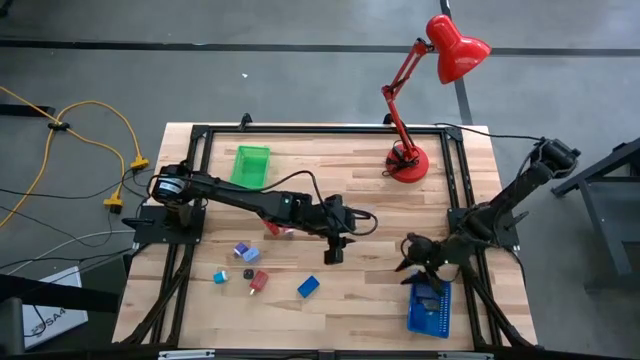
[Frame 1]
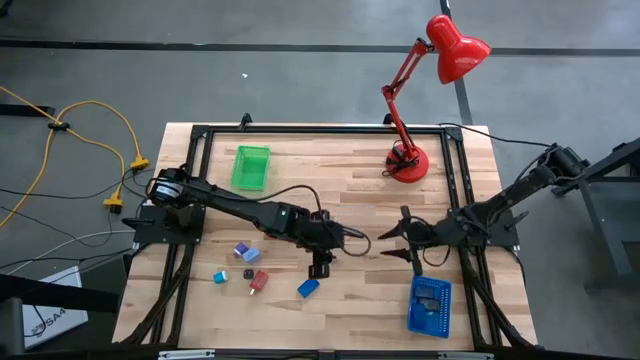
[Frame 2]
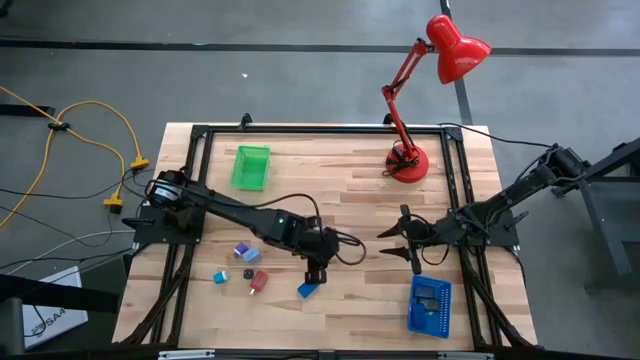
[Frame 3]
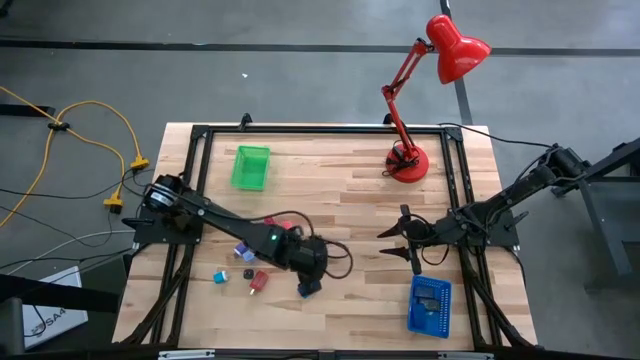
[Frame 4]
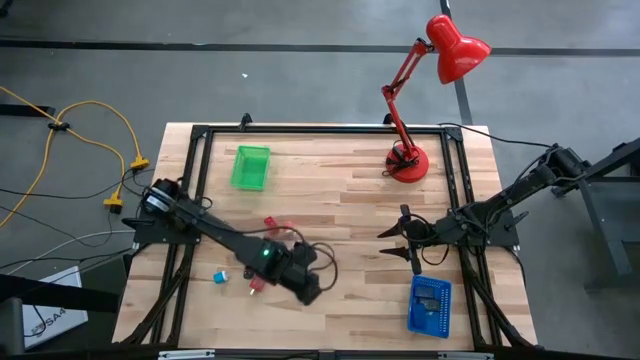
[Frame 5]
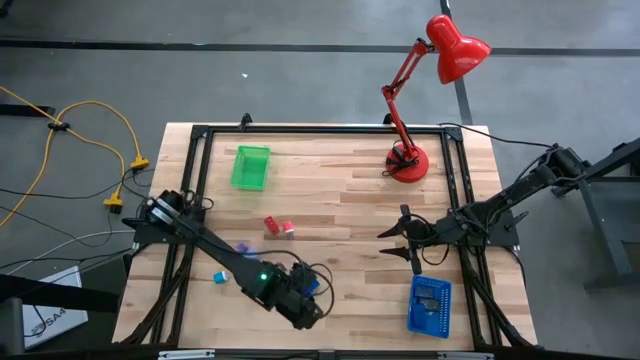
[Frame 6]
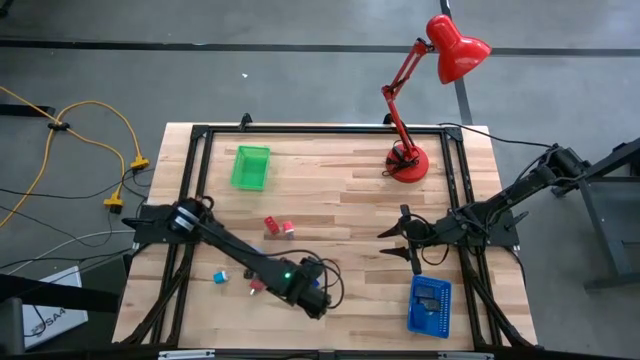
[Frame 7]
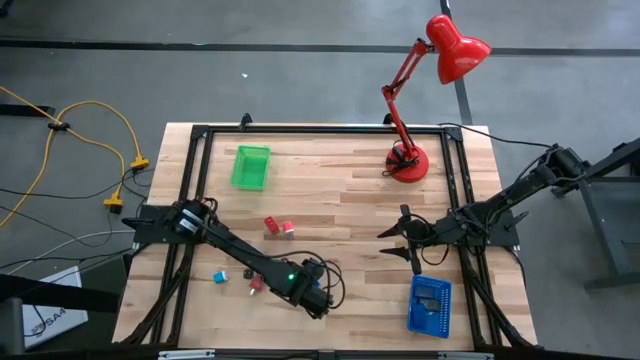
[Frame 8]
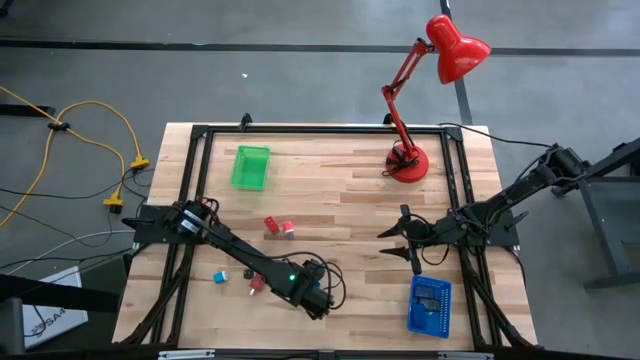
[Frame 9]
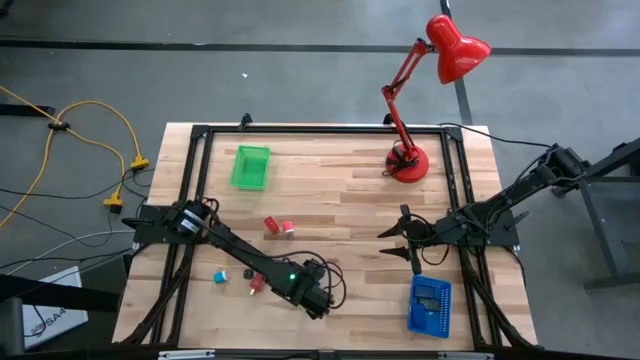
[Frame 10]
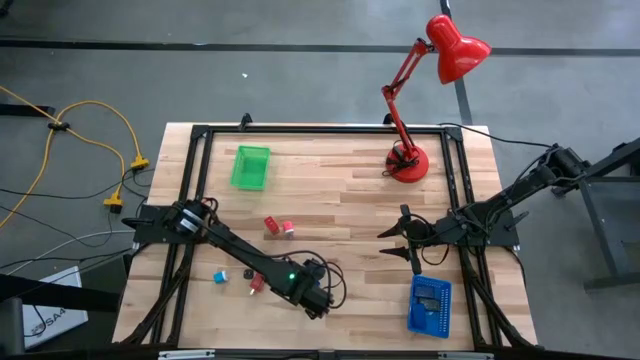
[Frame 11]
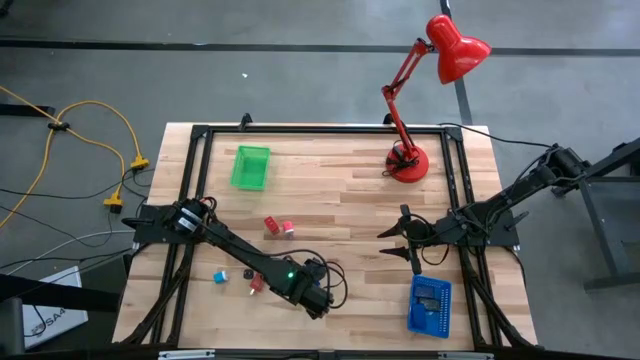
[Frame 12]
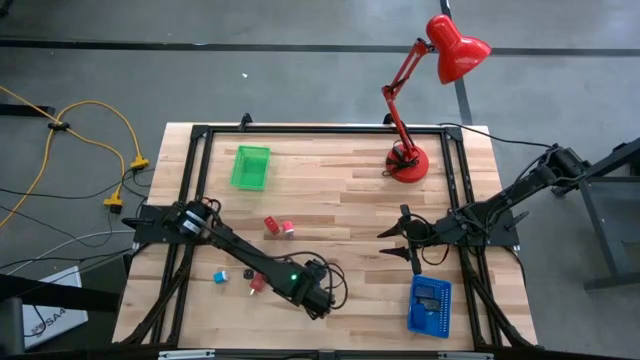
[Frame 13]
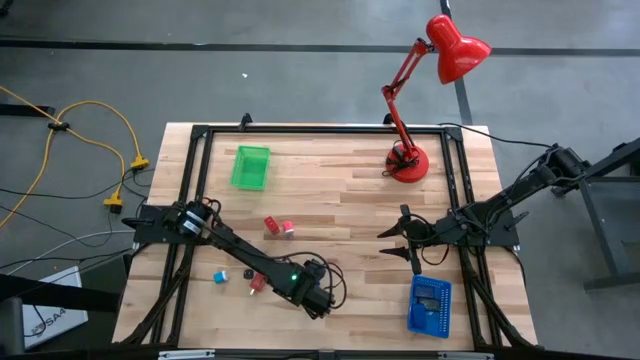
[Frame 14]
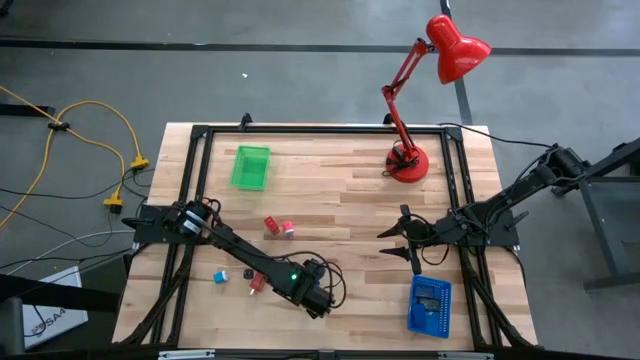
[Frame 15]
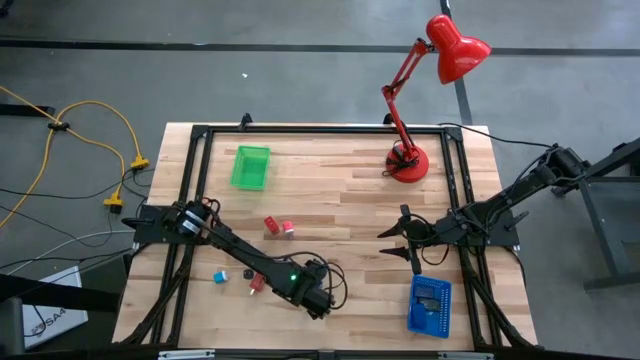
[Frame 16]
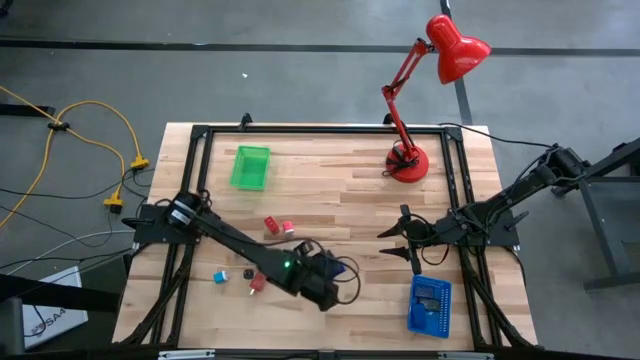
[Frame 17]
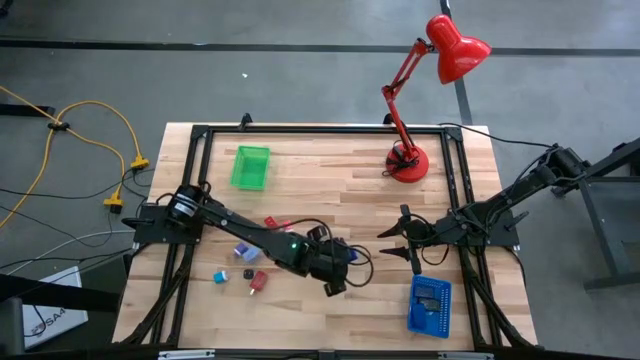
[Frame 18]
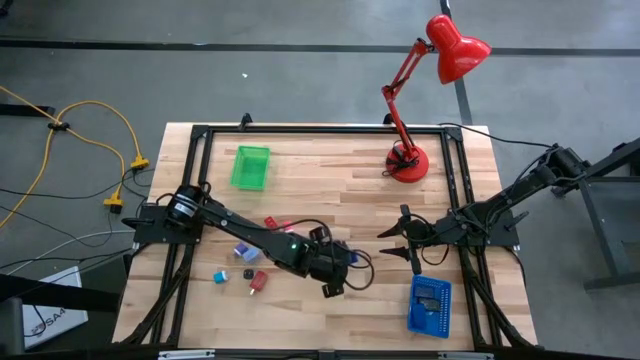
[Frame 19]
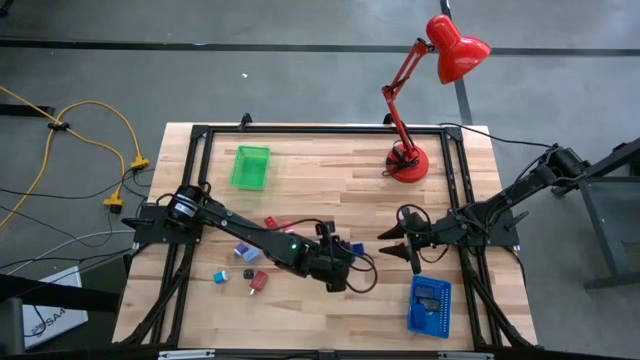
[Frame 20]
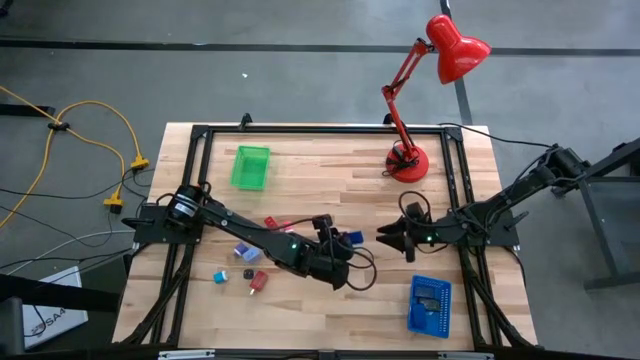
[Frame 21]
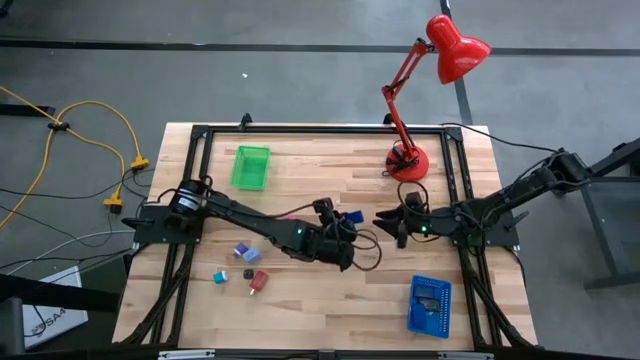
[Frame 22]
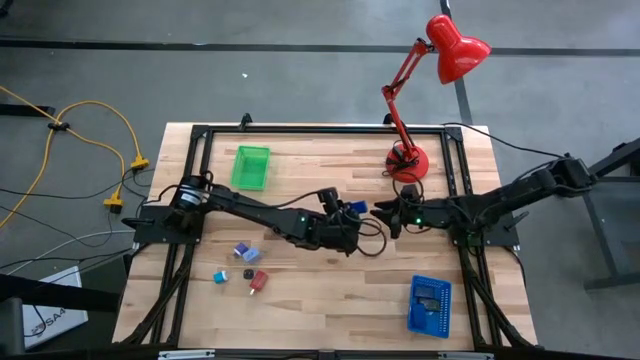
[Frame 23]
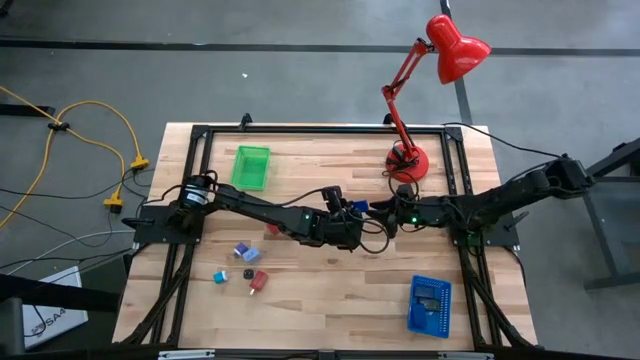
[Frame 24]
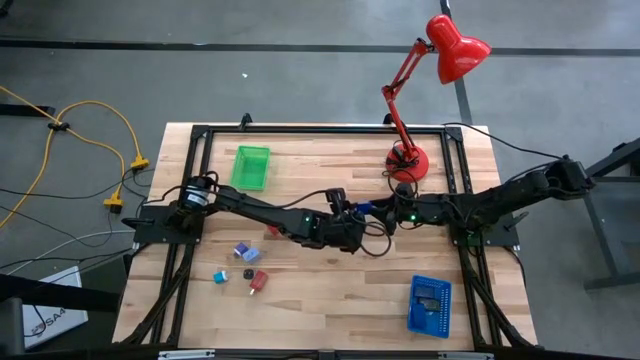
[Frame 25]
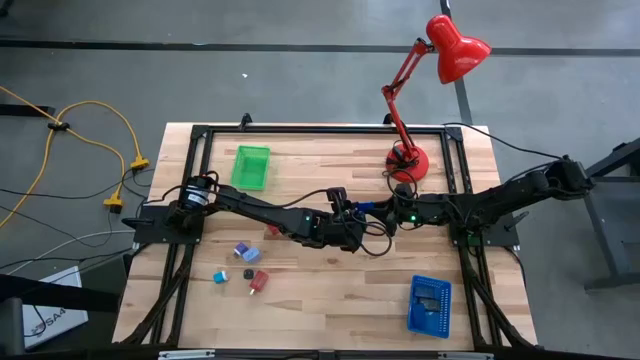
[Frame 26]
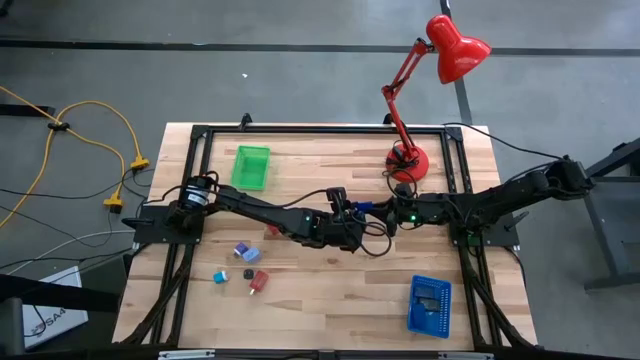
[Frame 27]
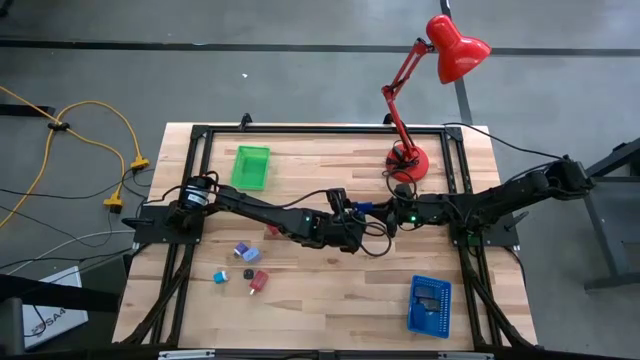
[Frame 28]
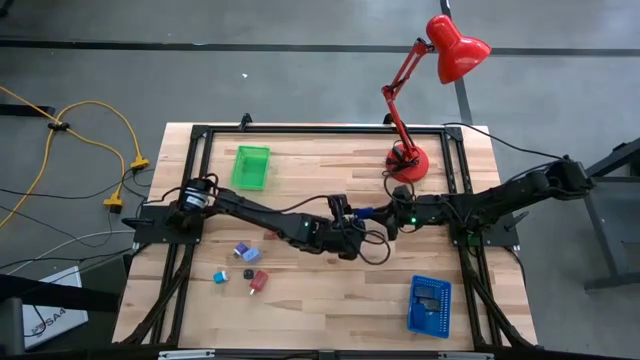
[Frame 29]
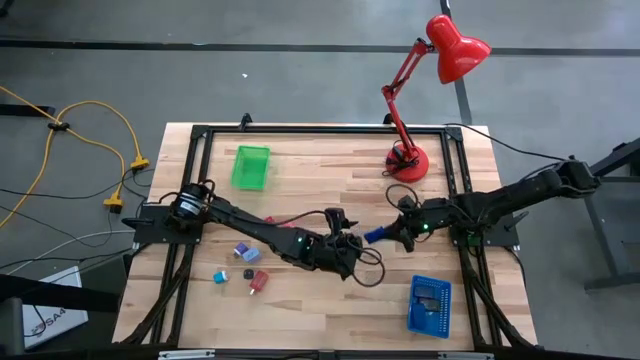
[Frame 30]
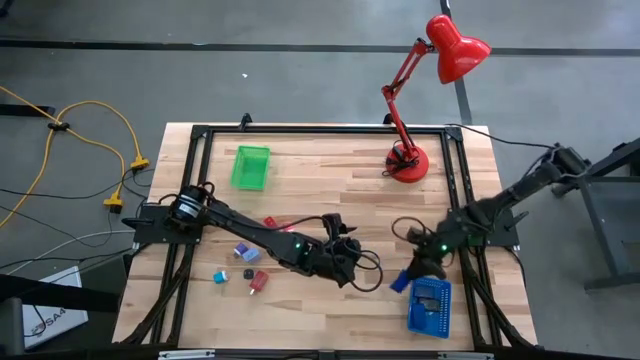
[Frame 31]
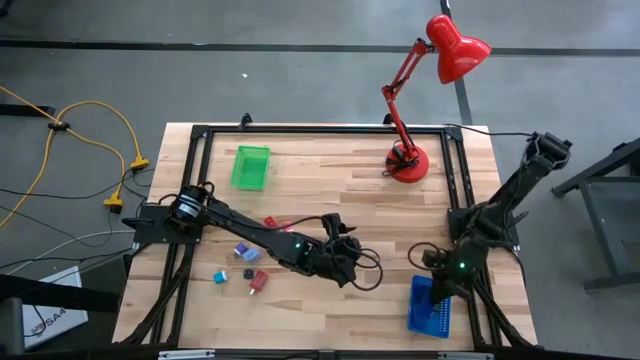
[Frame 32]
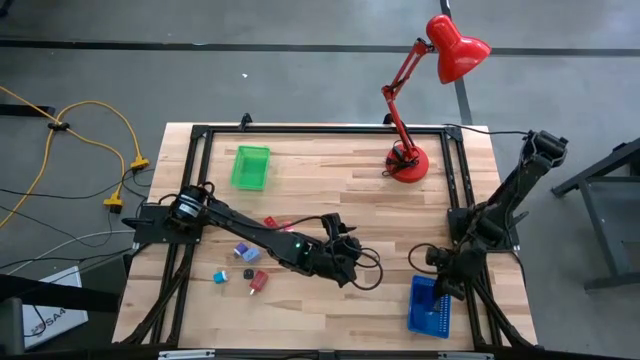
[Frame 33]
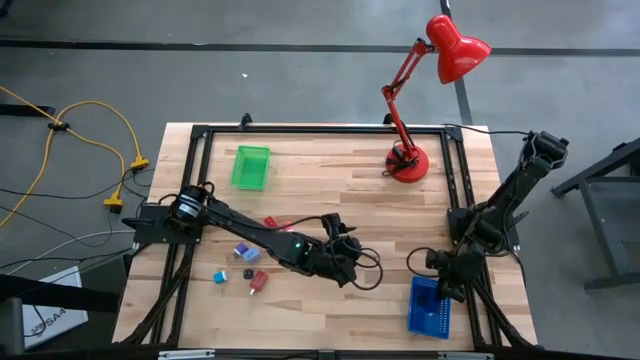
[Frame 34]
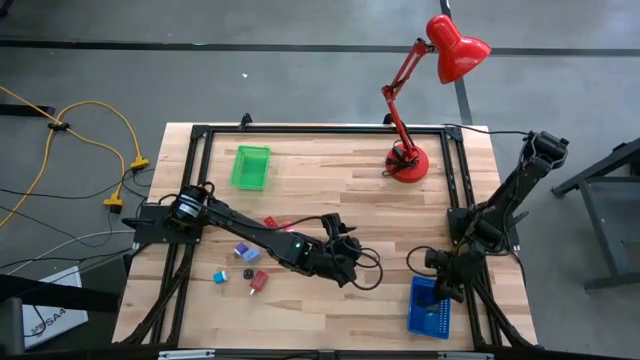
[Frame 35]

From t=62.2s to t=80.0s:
Task: Pick & Place Office items
Put the blue digital timer into the blue bin
